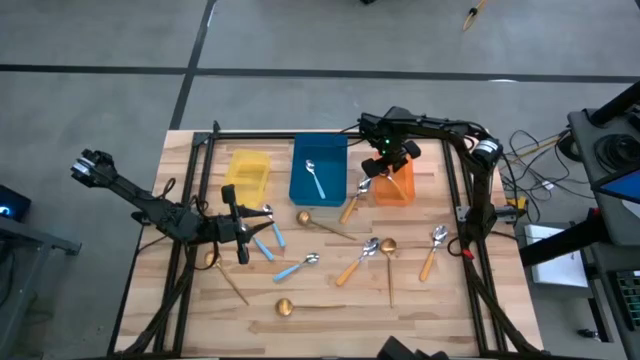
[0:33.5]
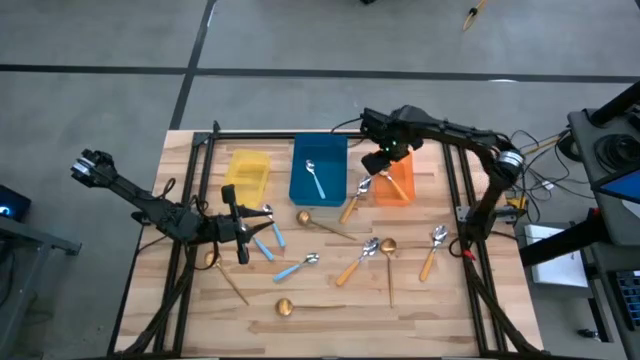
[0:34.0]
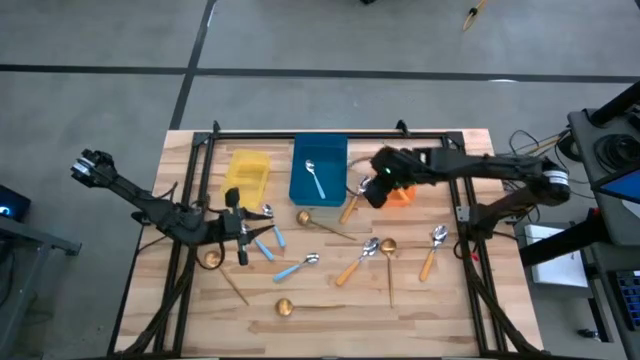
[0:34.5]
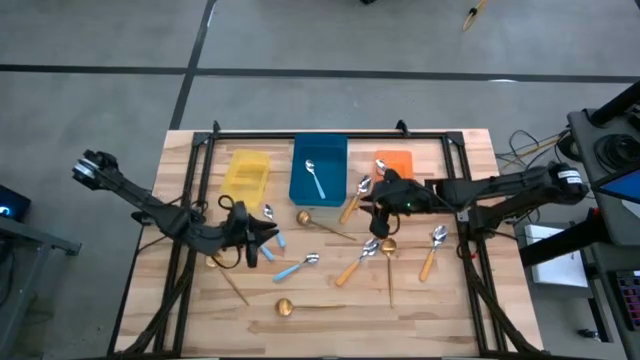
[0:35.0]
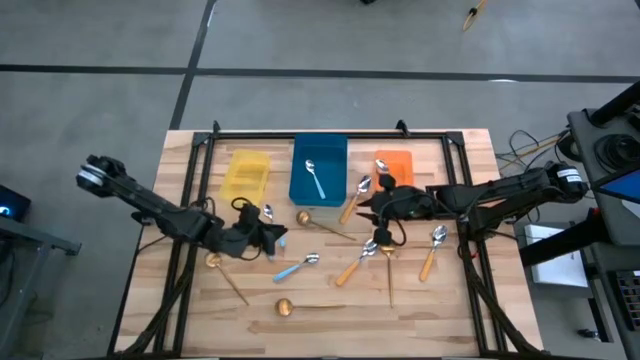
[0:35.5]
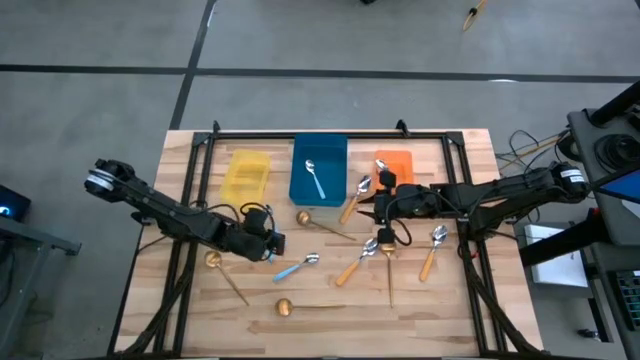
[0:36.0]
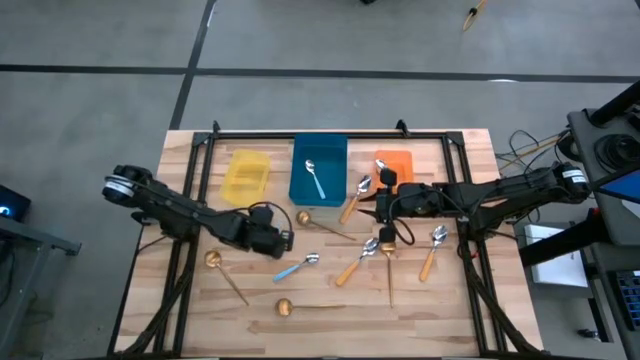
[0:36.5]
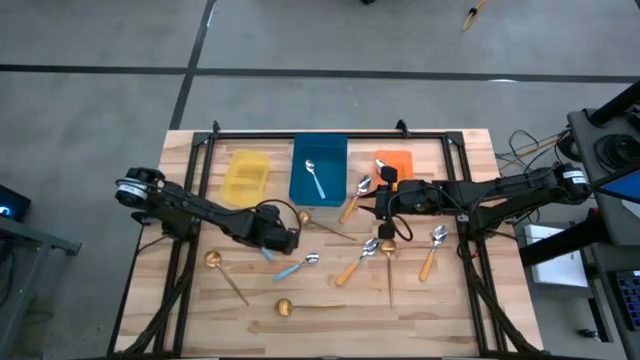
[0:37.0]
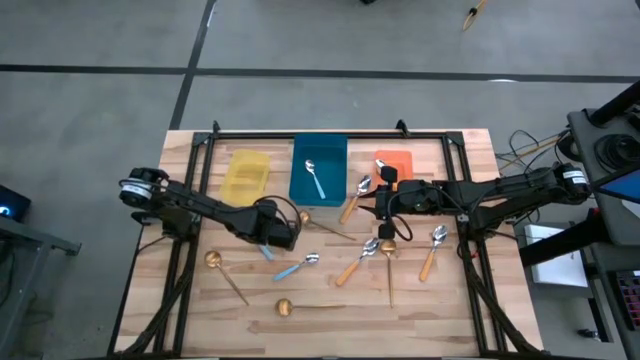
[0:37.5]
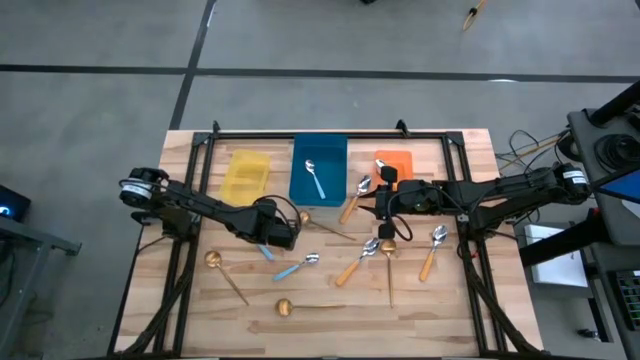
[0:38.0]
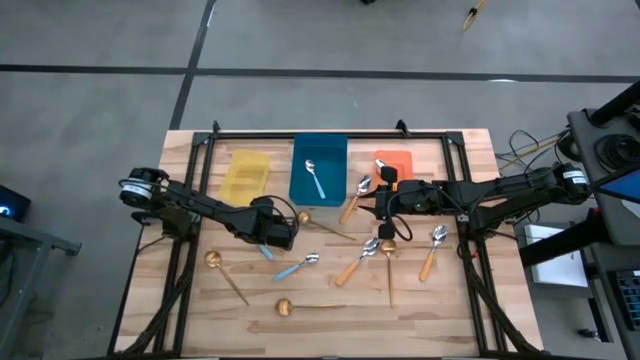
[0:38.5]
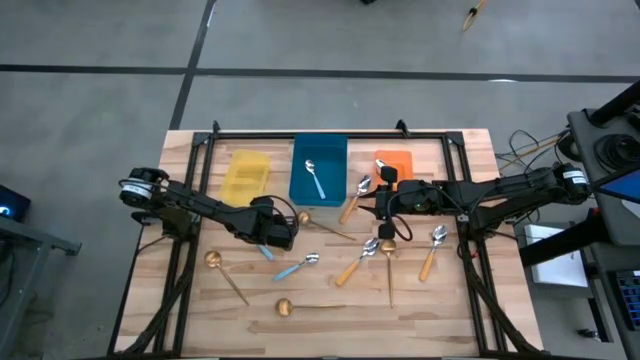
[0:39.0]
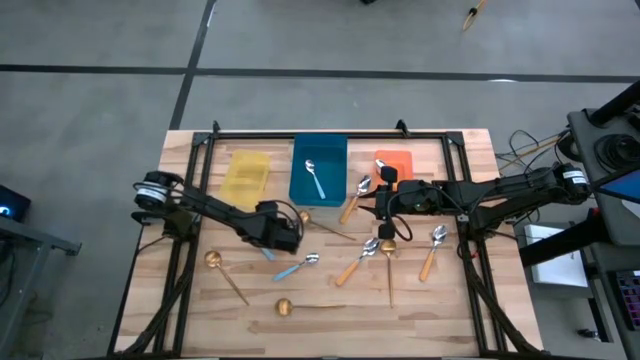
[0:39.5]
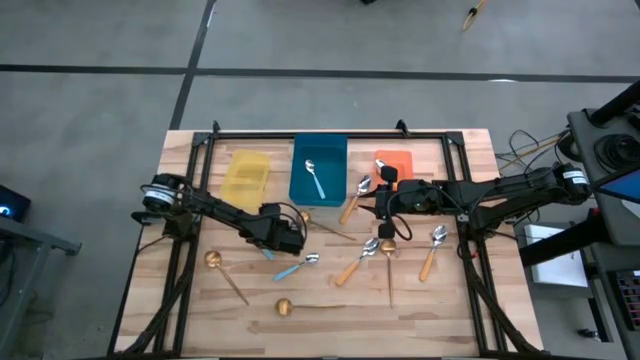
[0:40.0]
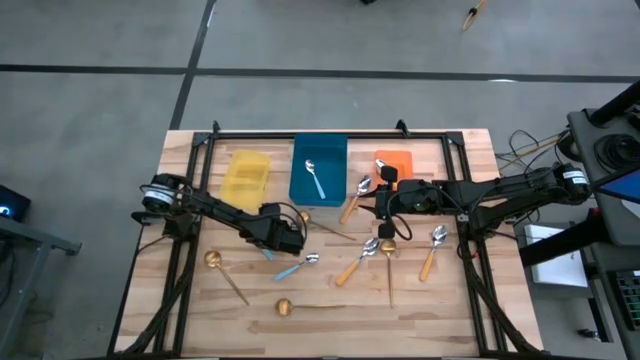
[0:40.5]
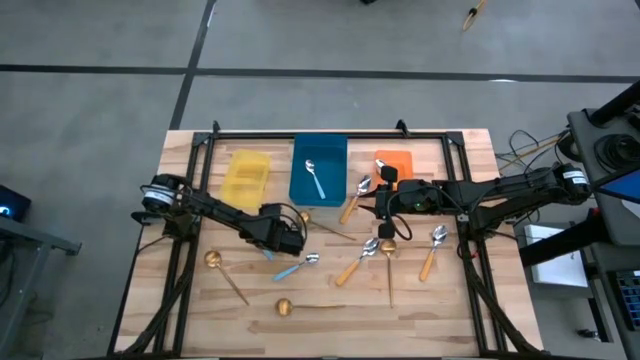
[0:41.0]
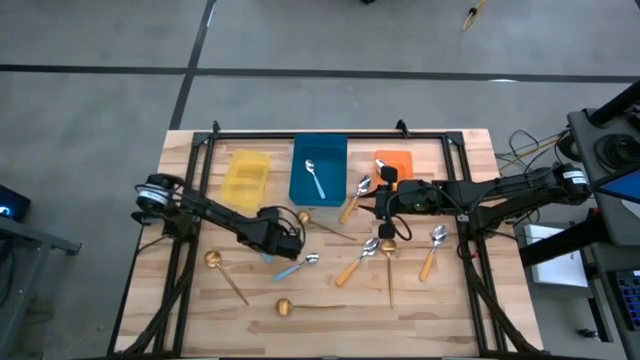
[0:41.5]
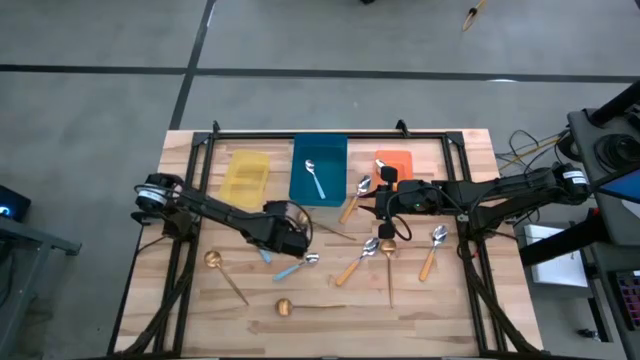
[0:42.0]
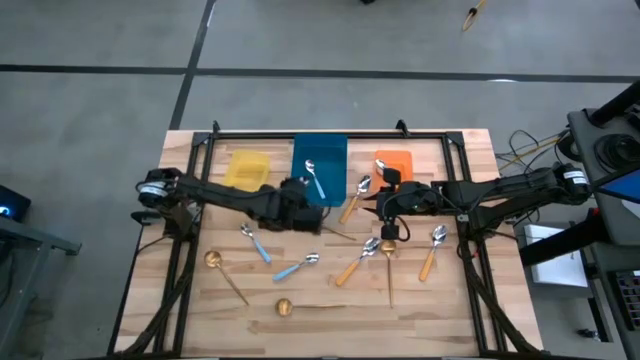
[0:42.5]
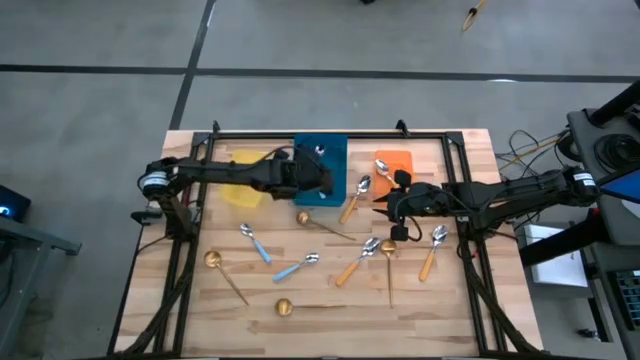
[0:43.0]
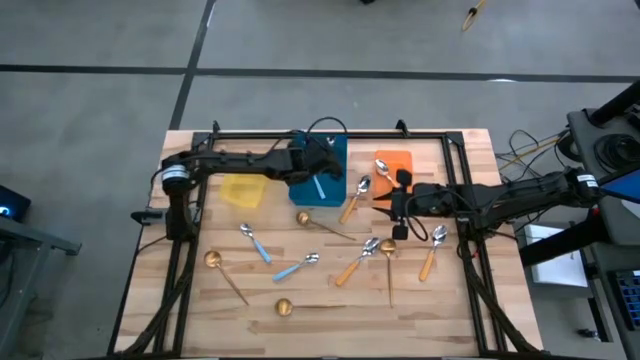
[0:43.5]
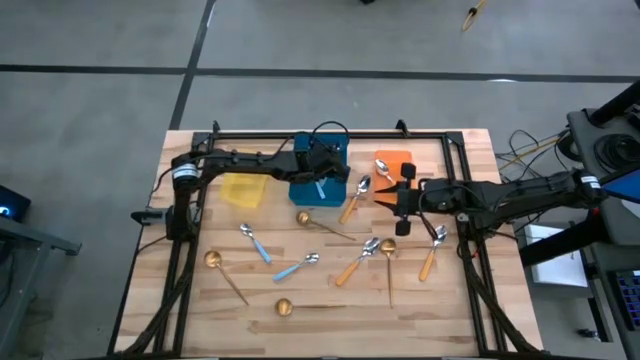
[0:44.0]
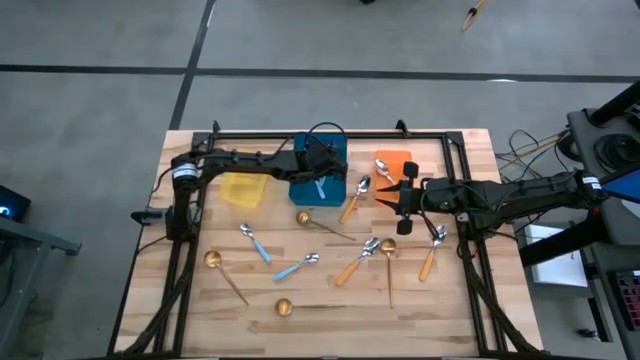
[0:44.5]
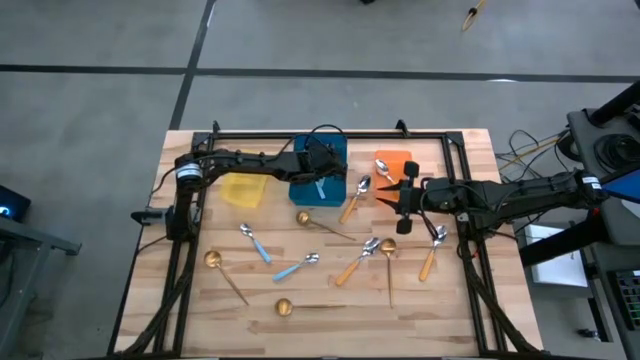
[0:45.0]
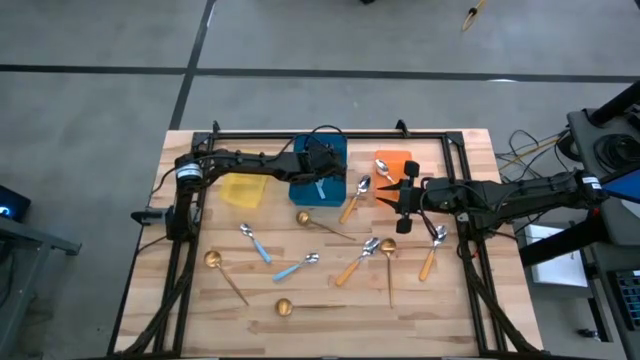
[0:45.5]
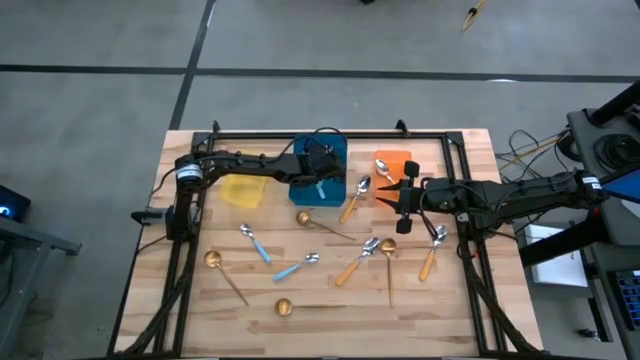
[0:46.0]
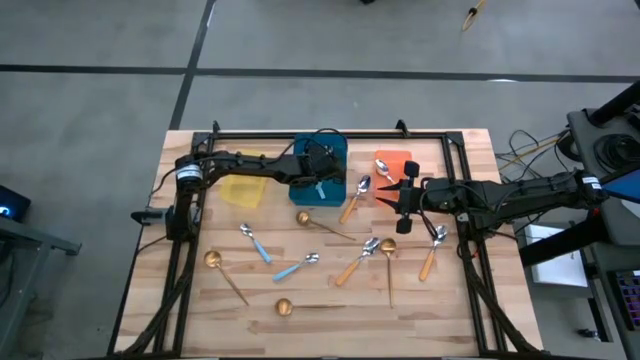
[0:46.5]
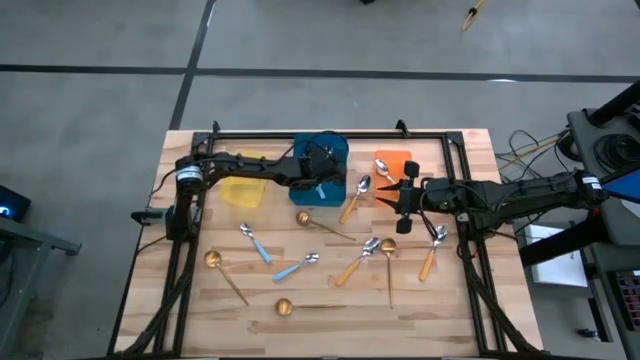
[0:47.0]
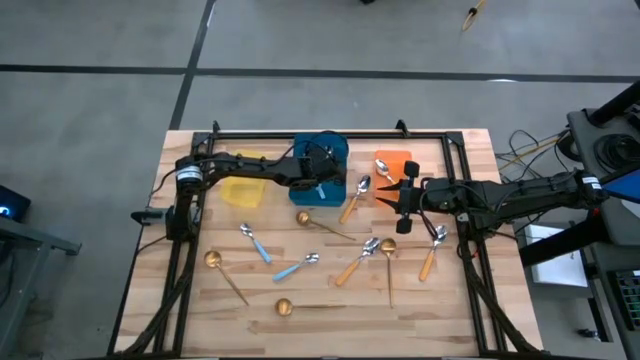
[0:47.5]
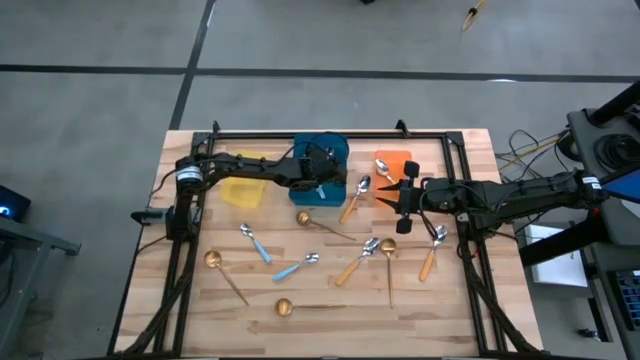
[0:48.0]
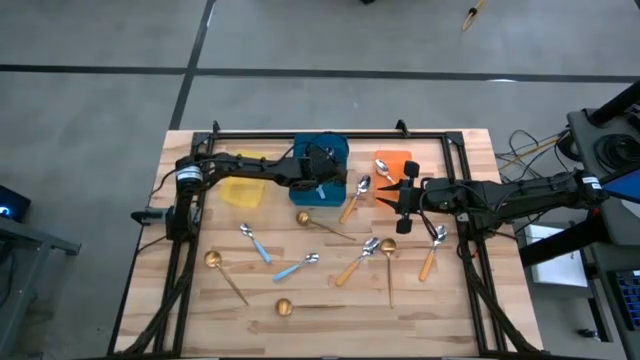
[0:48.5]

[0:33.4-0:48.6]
Task: Sort silverware by color (type)
Put the blue spoon into the blue bin

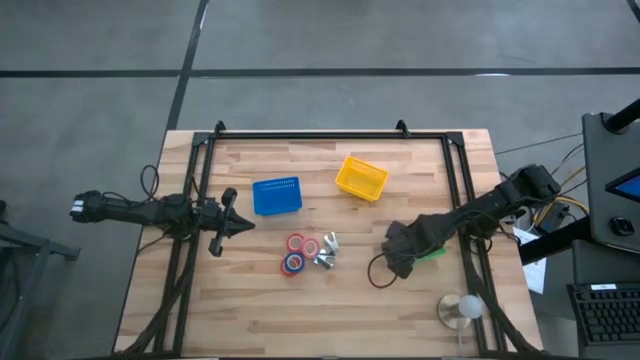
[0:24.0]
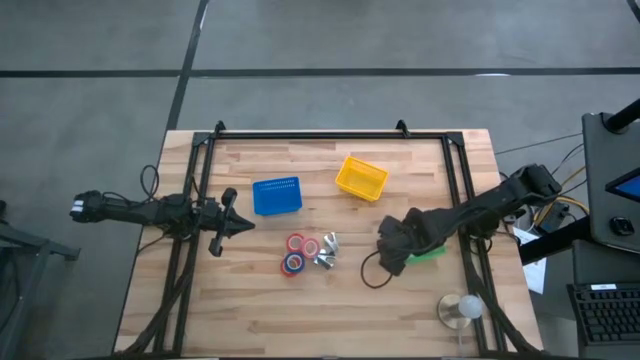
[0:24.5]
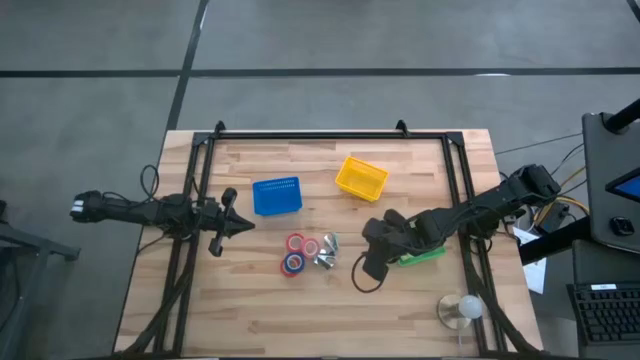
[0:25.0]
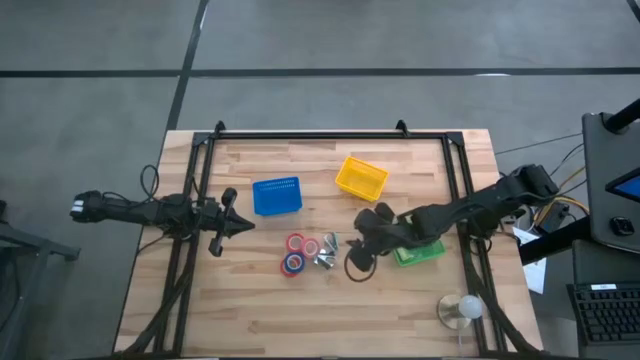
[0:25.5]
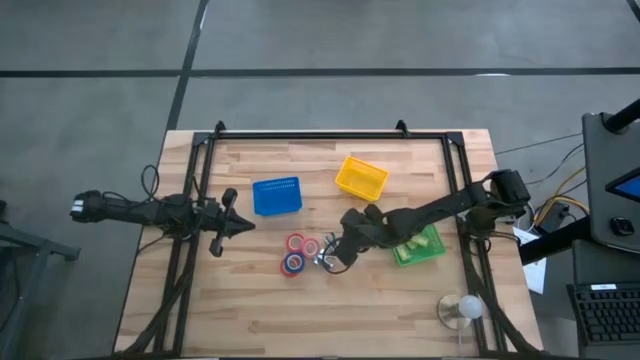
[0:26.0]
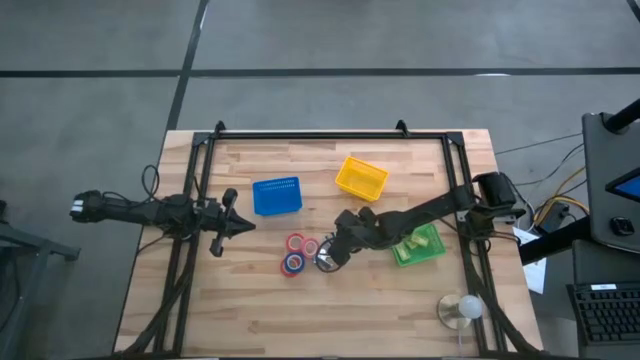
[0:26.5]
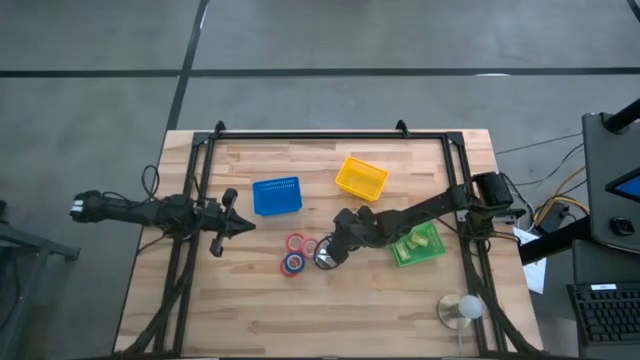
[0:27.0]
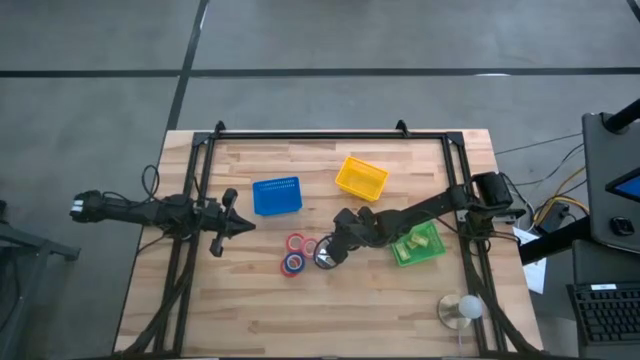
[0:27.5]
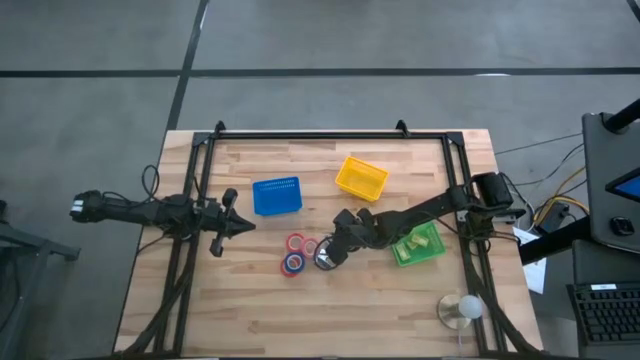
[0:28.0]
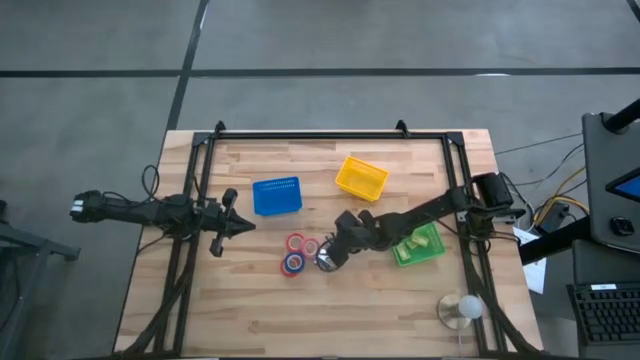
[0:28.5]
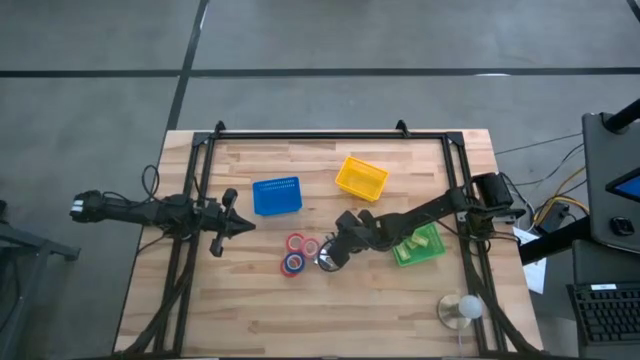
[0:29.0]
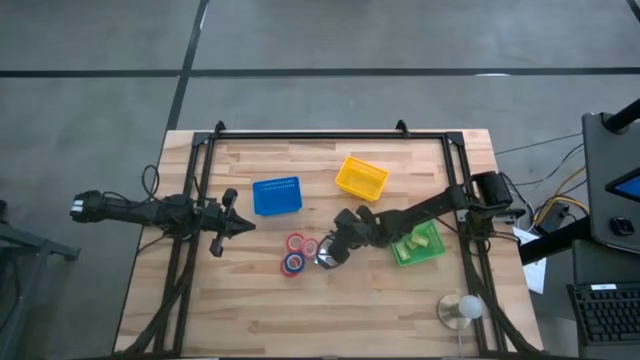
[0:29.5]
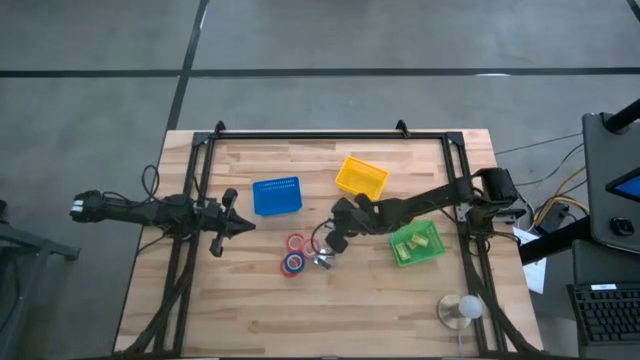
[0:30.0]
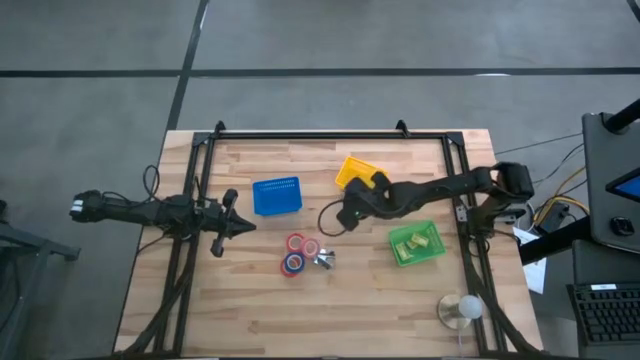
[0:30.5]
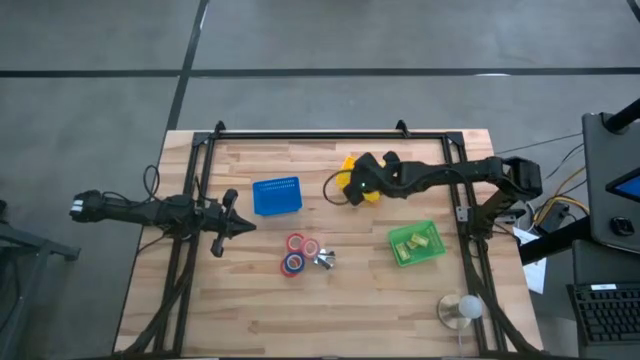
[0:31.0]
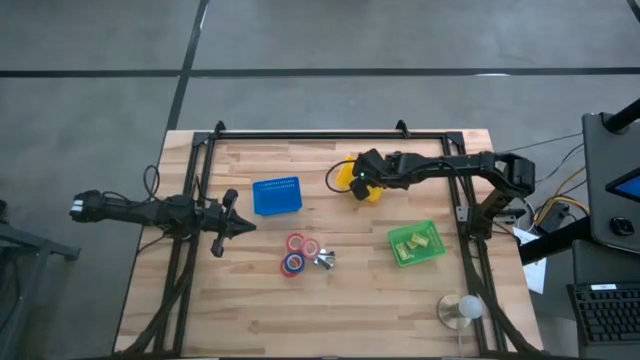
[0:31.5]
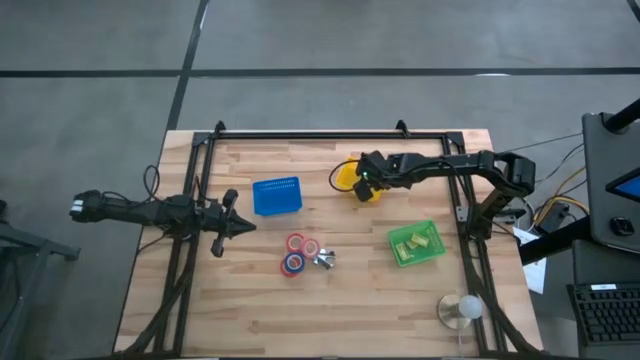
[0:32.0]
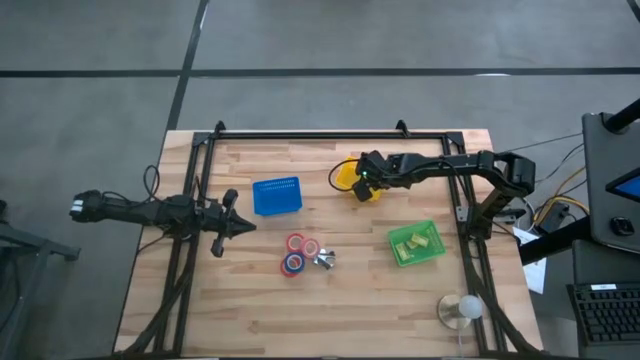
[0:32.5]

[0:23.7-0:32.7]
Task: Pick and place Stapler, Stapler remover, tape
Put the top blue staple remover into the yellow bin
